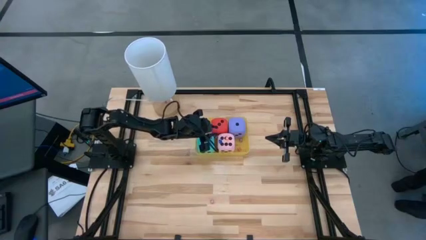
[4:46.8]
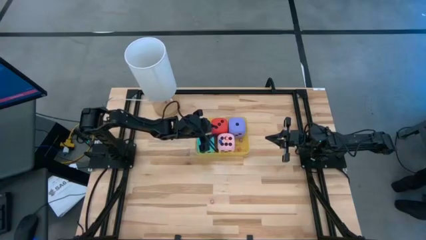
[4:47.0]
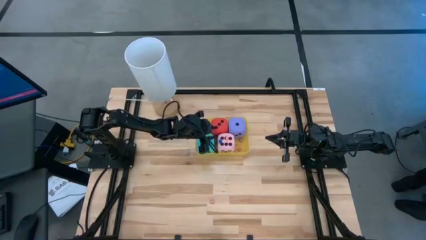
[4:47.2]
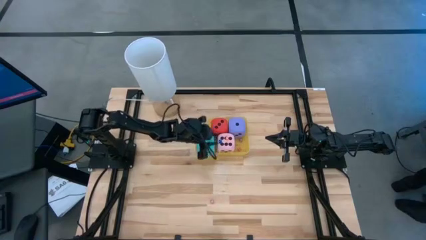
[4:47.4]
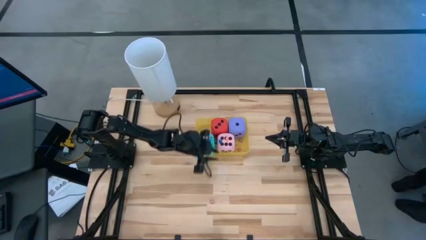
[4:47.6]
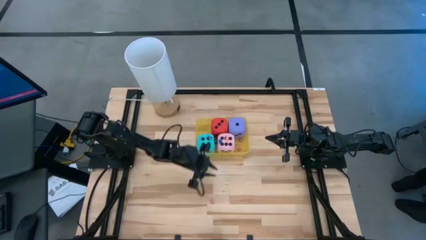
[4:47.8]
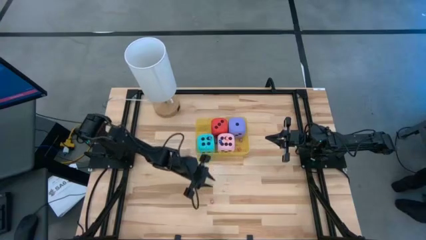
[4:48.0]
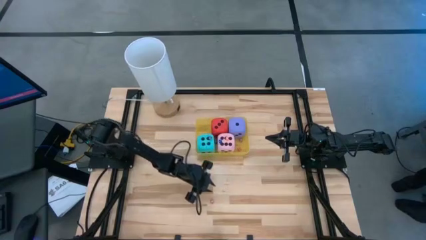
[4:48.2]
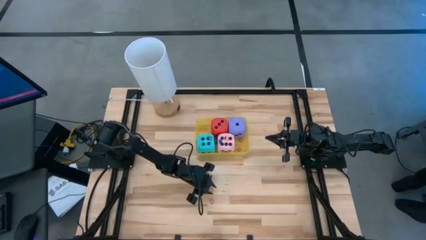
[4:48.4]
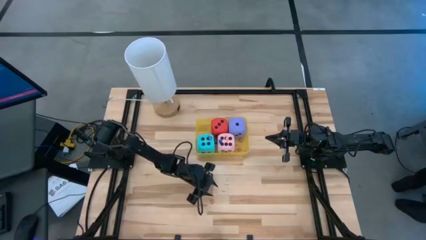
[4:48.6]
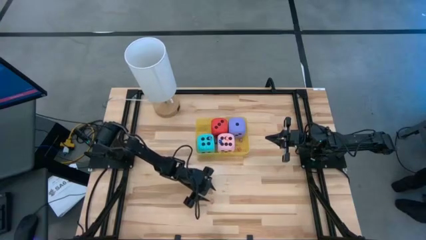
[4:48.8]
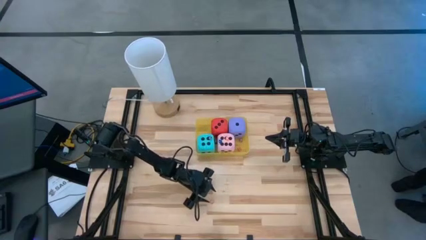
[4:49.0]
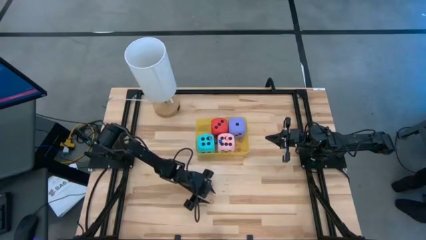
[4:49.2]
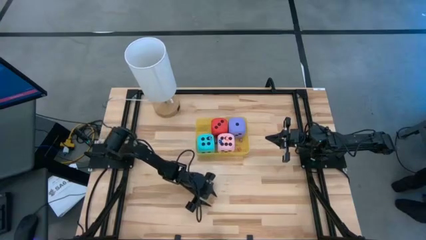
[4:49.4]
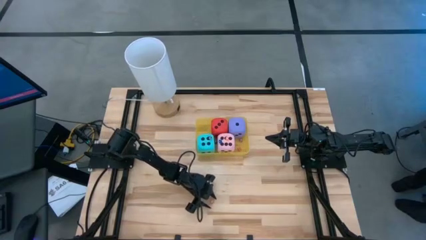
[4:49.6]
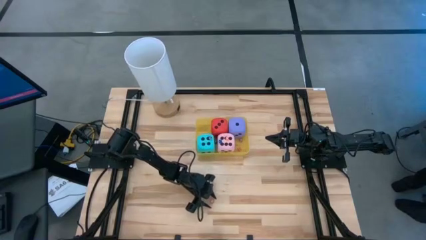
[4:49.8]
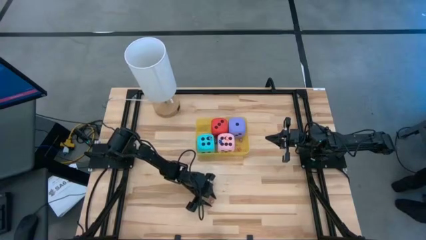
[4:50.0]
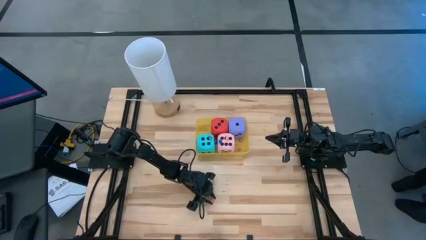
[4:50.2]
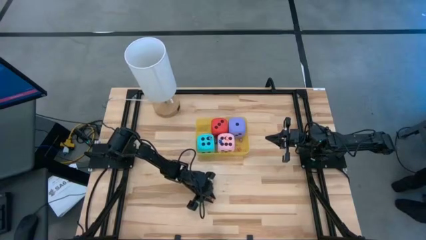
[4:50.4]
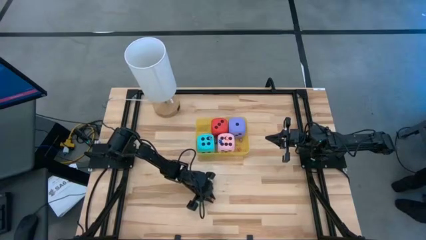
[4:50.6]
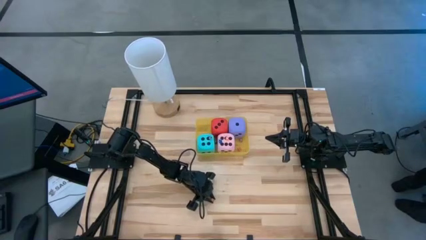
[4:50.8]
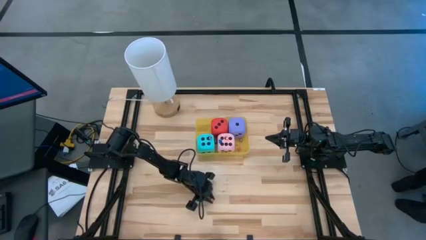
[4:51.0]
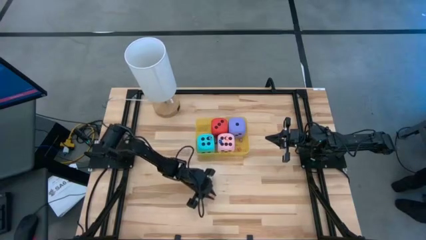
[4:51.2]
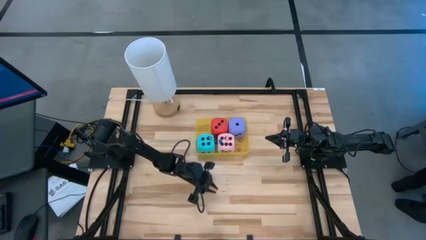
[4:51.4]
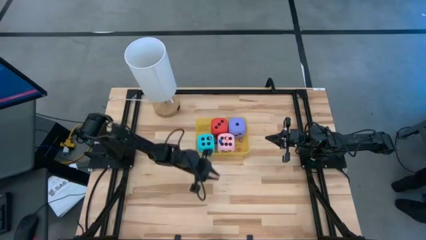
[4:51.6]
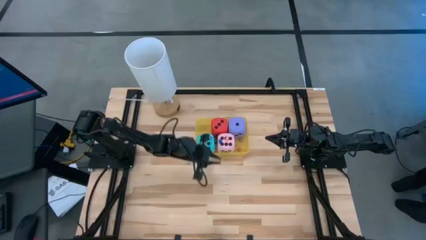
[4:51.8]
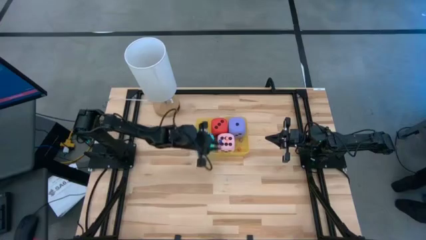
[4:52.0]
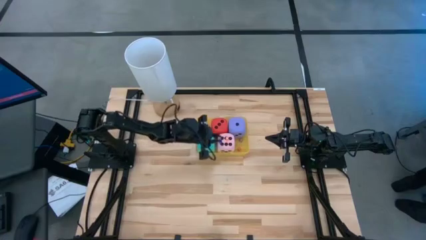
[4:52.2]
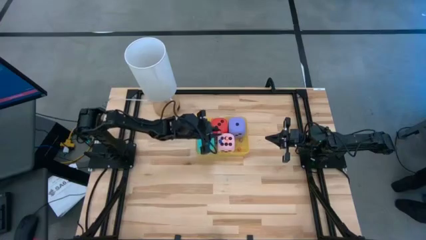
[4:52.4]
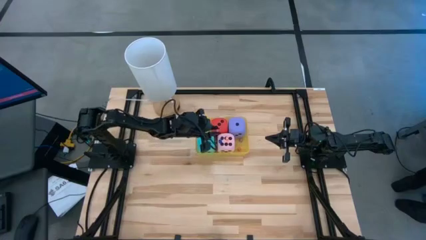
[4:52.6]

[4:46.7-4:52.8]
Task: Pick & Place Dice
Put the small pink dice into the yellow bin

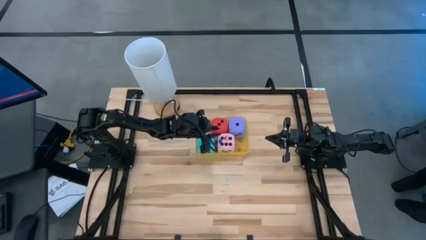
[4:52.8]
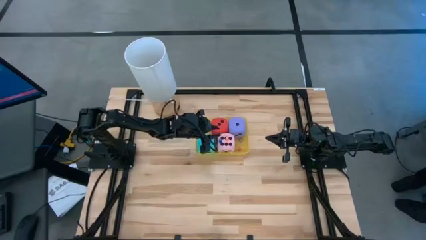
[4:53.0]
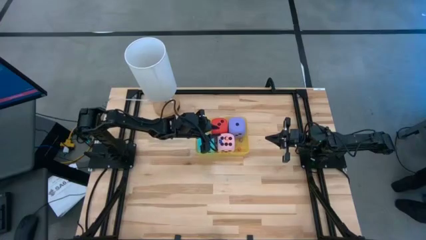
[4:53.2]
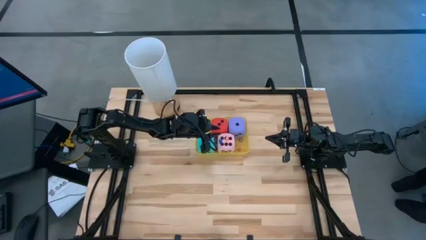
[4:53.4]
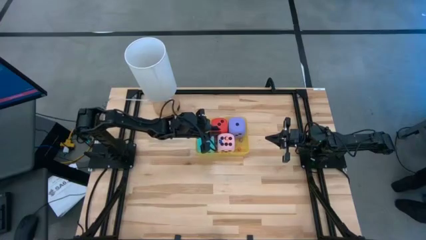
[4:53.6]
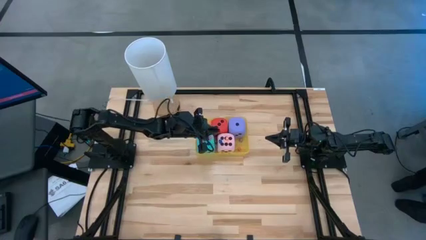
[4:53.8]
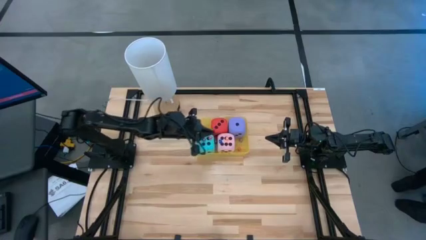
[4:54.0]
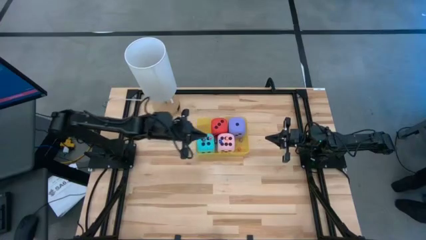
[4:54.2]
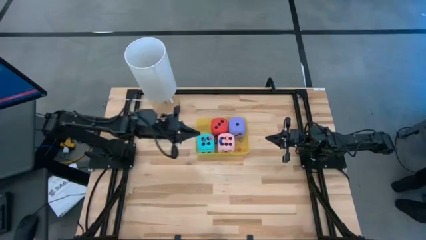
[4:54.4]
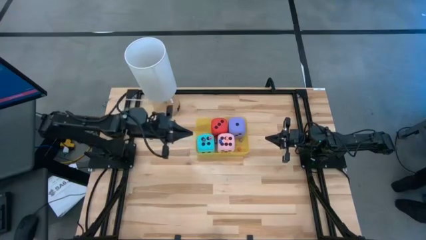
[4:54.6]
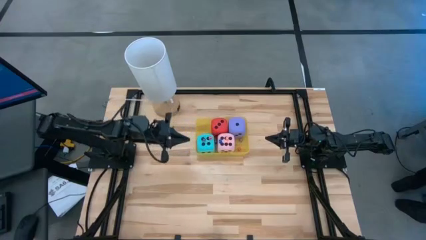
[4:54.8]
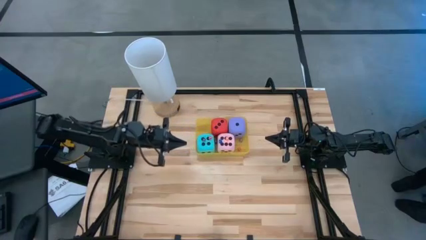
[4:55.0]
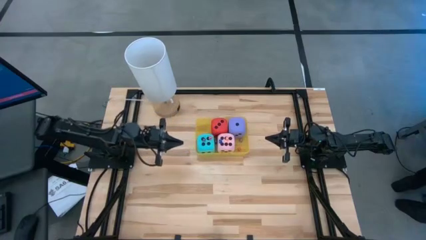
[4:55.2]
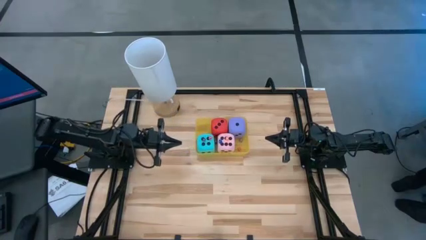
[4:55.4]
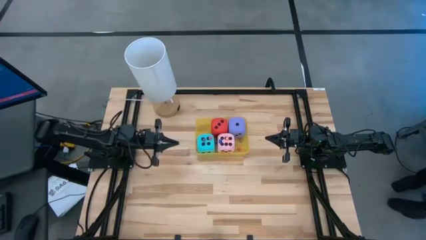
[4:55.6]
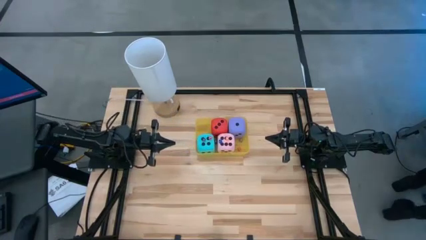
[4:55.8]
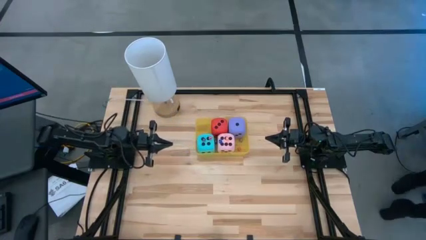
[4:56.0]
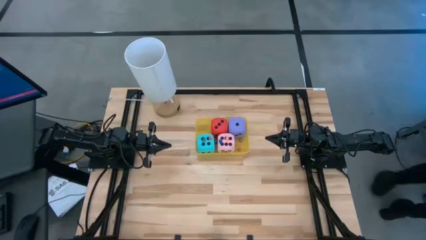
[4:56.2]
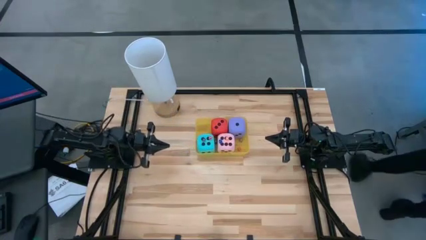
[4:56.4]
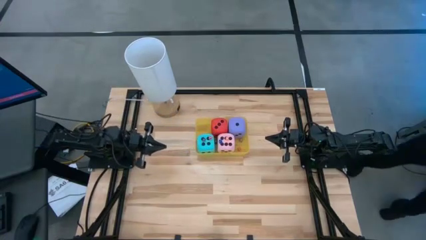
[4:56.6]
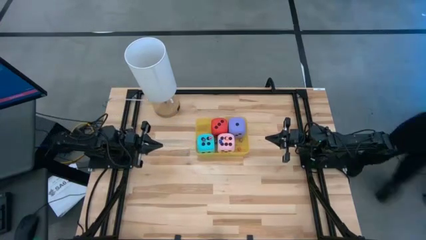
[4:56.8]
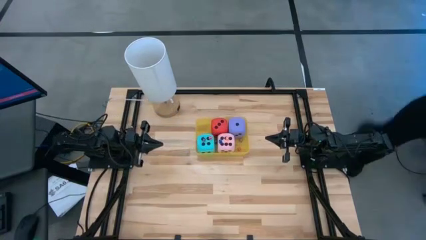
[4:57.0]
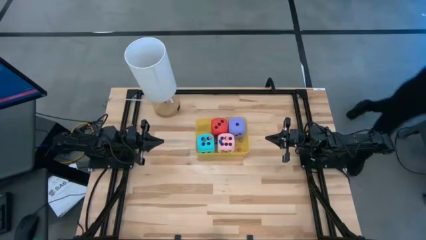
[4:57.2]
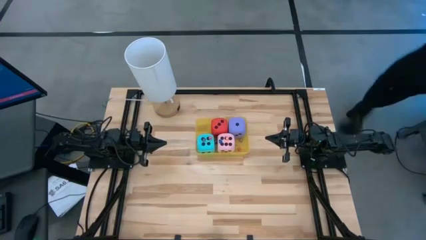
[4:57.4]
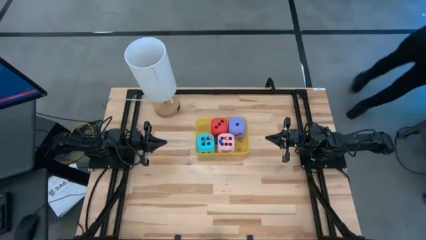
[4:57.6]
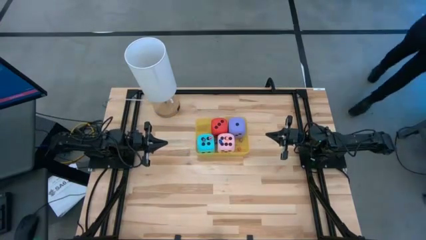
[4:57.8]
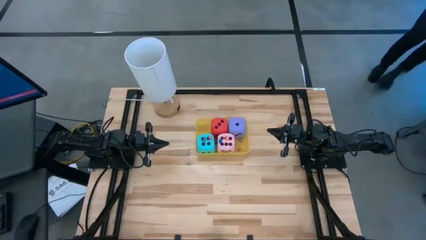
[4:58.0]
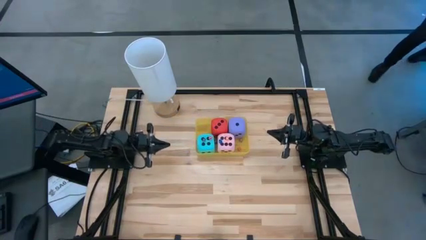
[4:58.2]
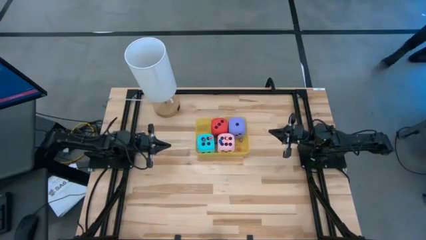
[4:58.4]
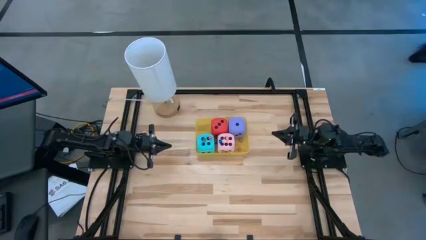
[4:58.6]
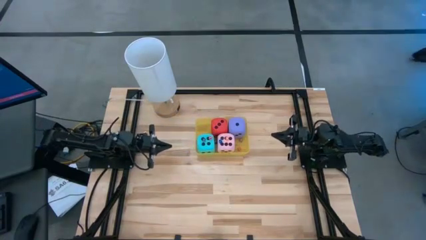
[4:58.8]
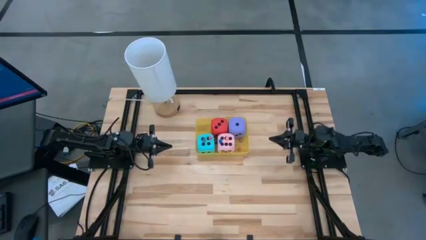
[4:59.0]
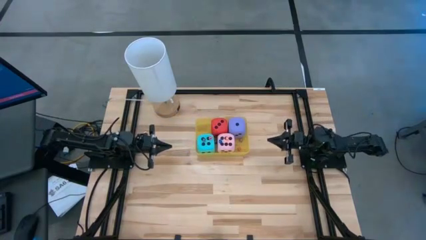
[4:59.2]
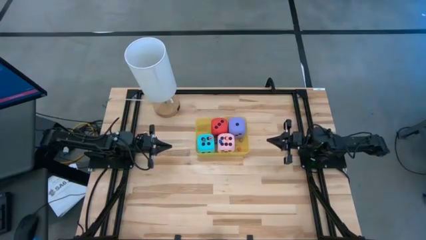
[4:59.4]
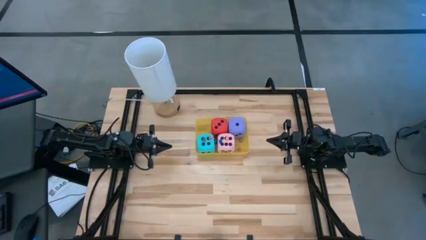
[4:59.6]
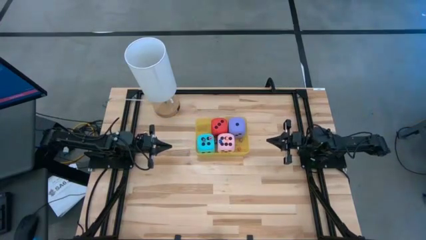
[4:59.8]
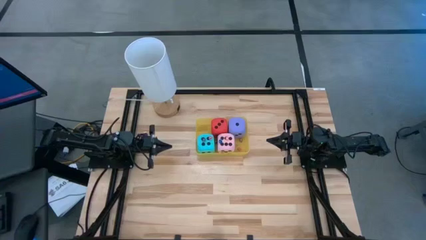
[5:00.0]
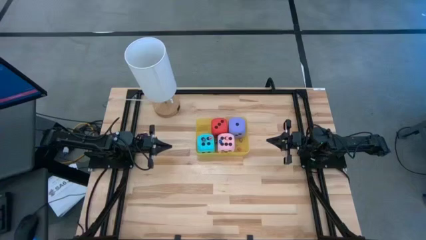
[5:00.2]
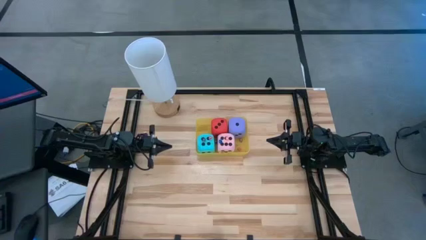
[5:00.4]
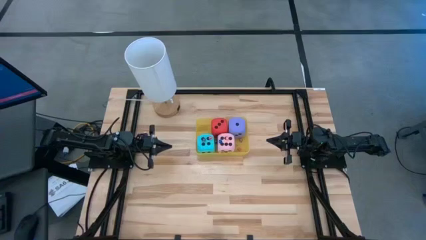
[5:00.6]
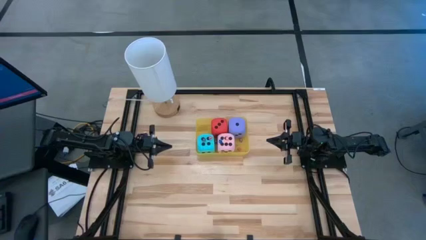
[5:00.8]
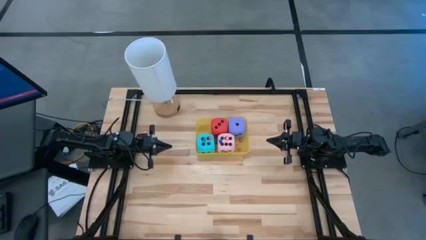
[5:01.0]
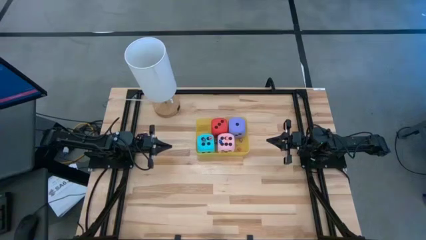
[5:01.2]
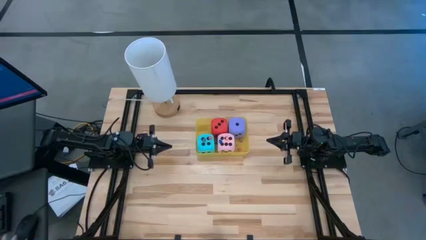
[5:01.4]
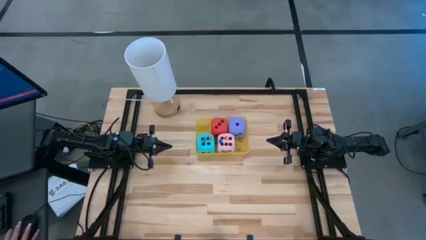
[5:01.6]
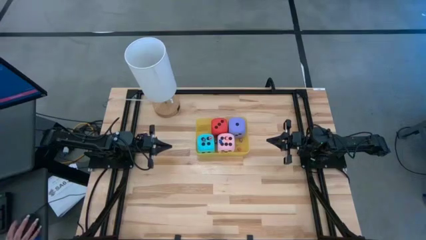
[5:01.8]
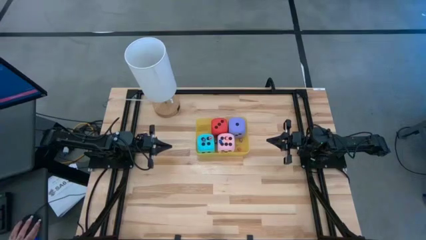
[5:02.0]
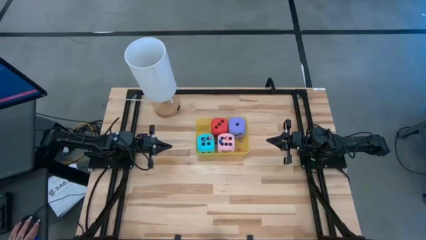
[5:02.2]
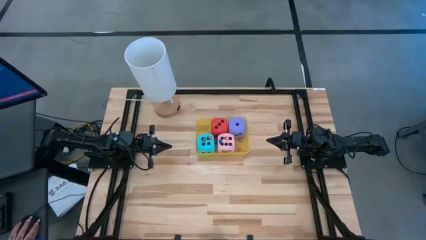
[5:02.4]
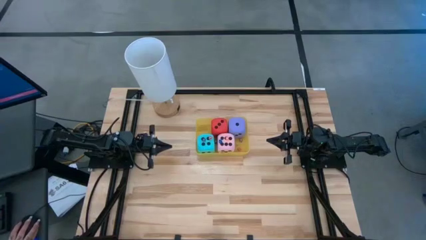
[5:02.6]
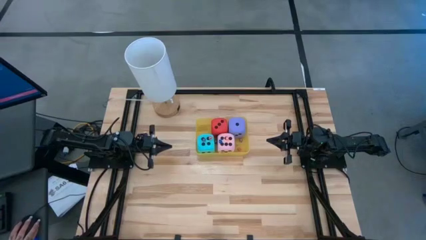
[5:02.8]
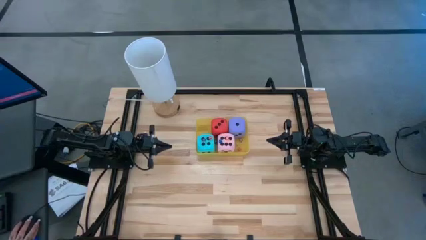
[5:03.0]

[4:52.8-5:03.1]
Return to Home Position
